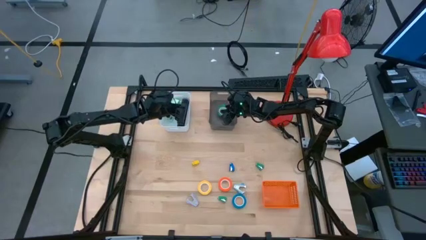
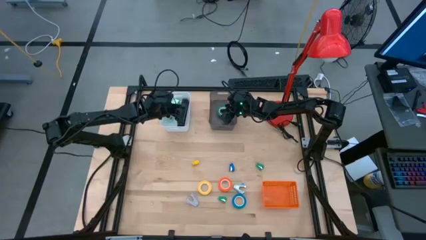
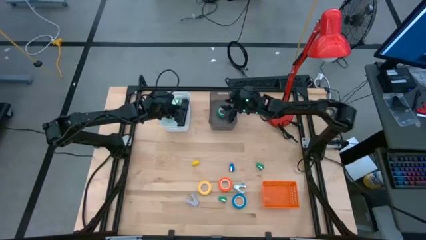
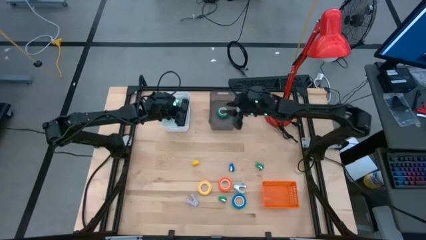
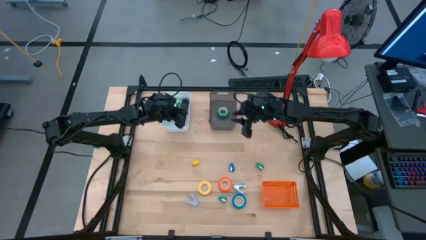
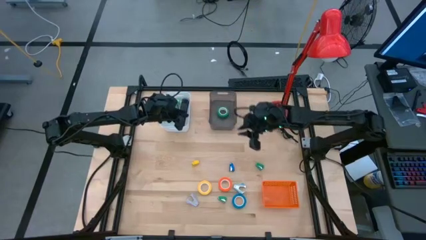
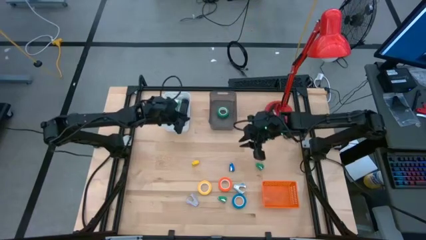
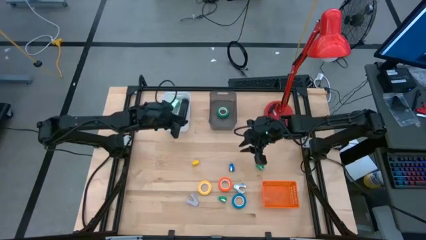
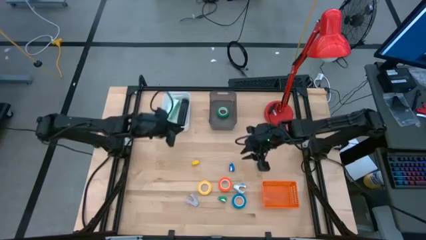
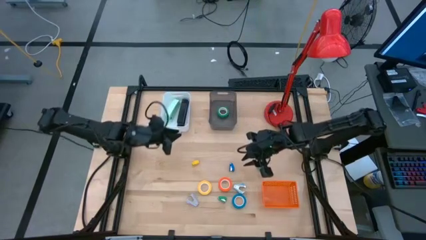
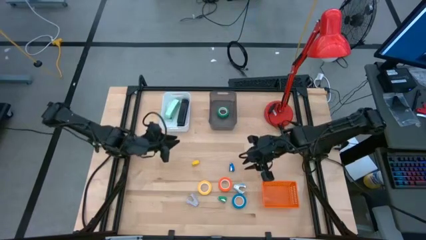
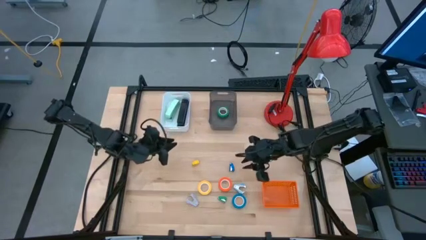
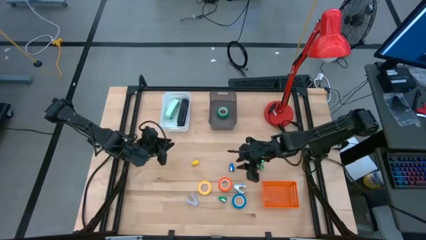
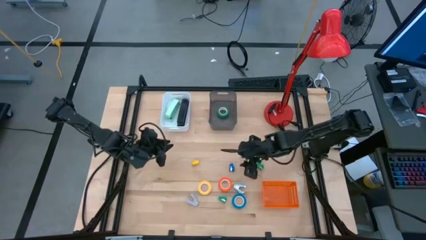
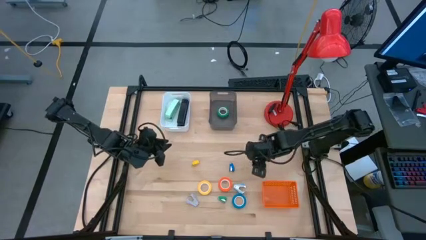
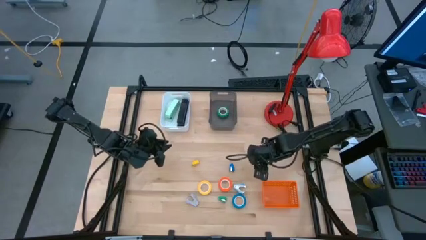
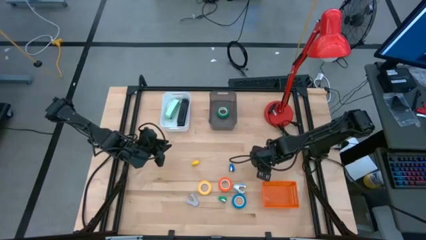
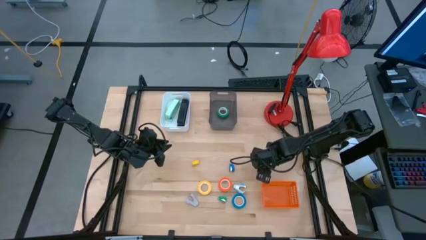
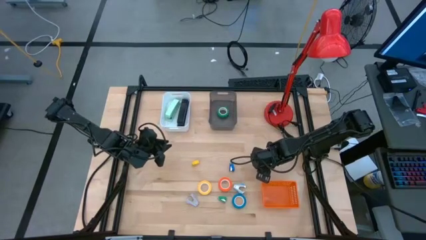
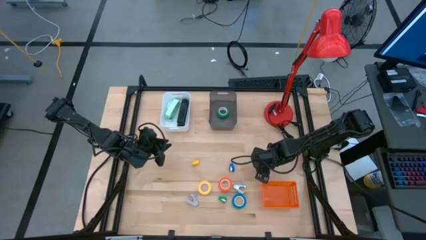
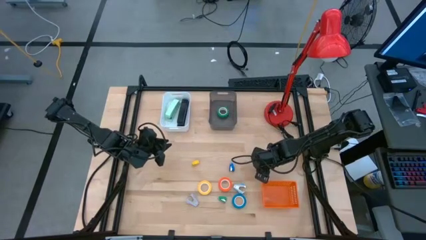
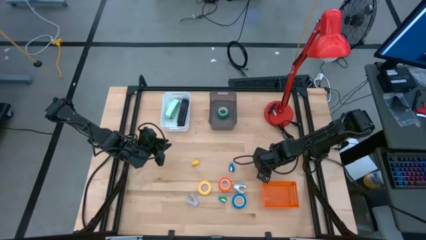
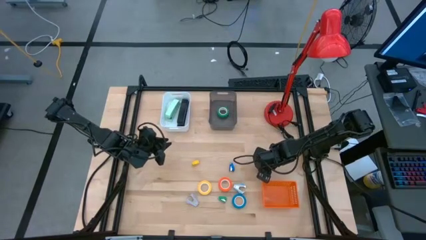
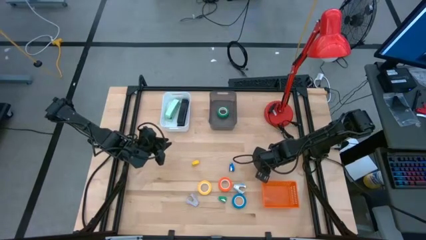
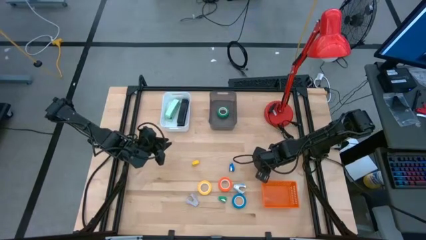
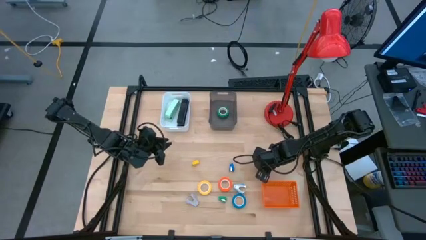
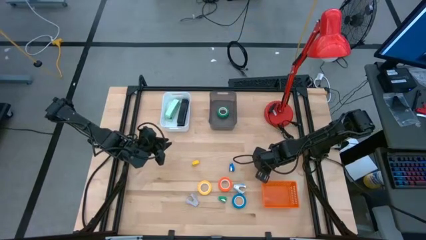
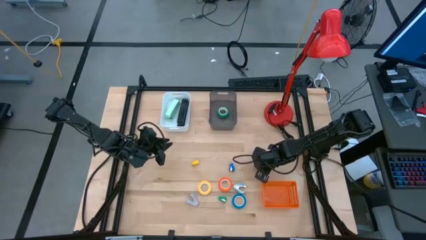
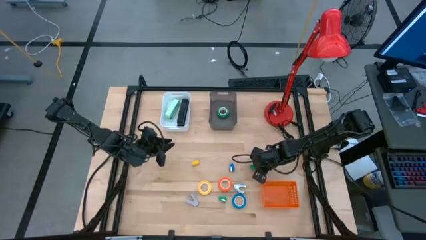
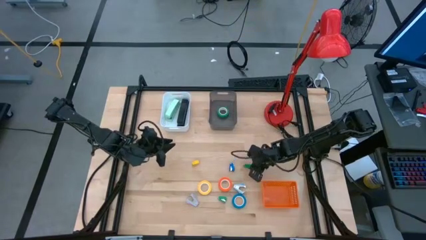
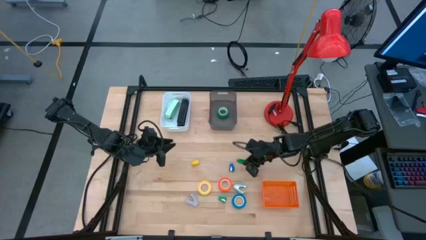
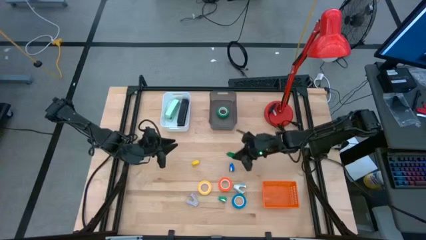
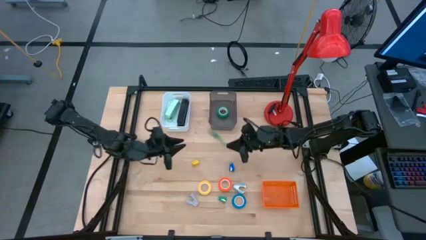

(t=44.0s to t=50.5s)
Task: Pick and place Stapler, Stapler remover, tape
Put the small green stapler into the white bin

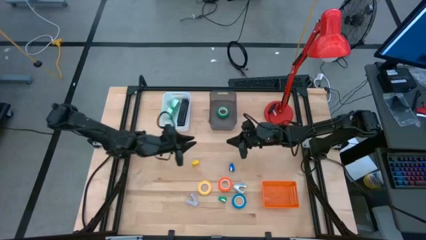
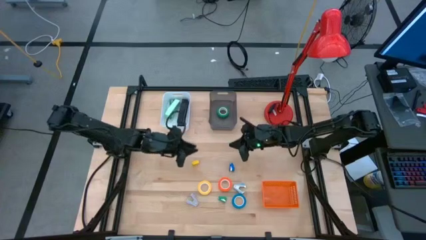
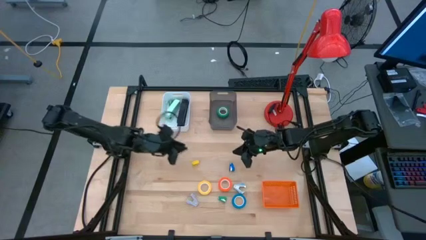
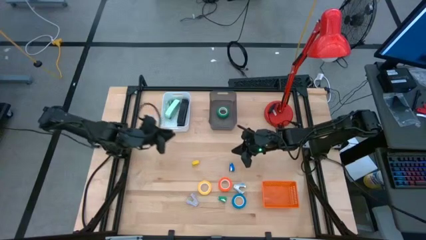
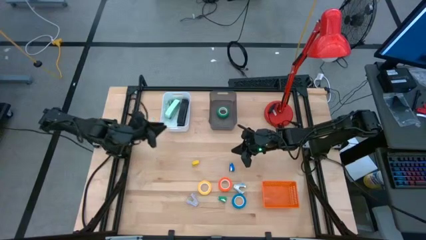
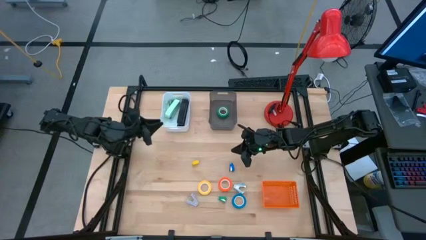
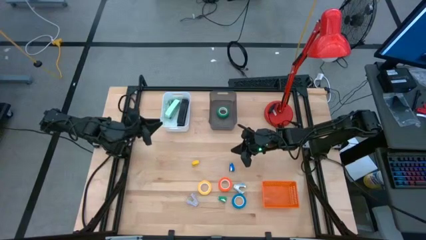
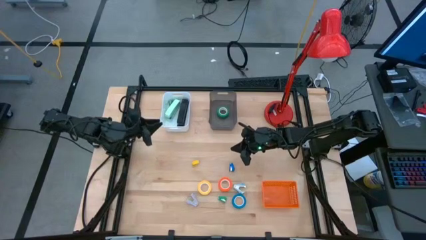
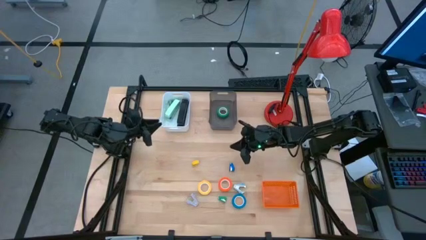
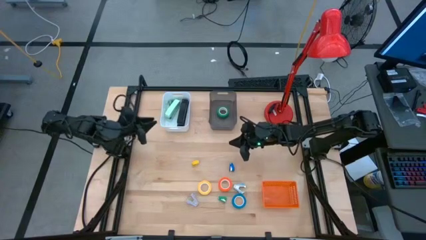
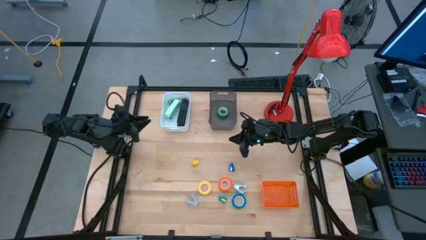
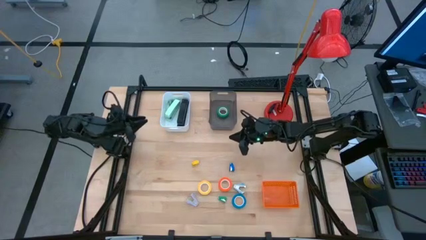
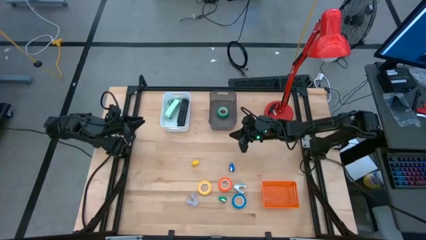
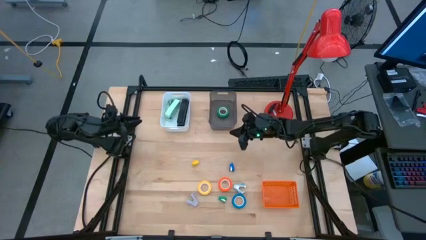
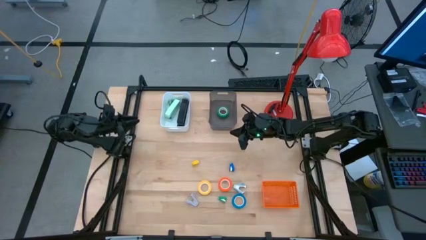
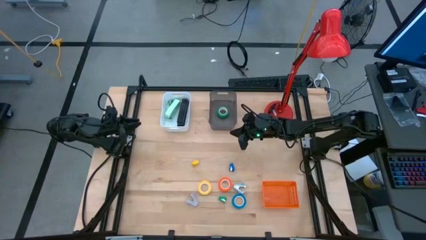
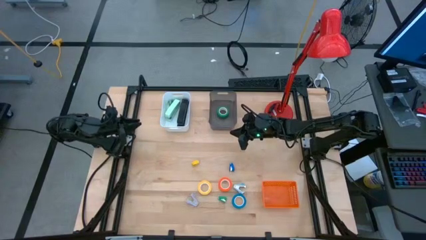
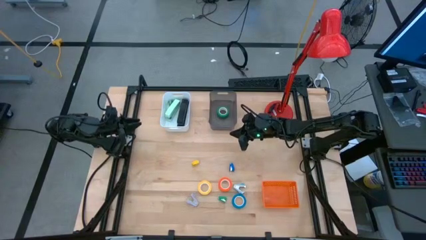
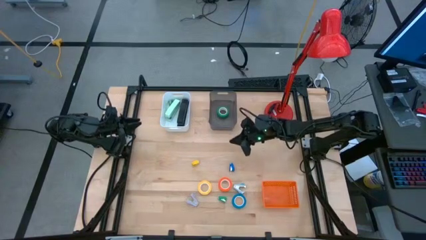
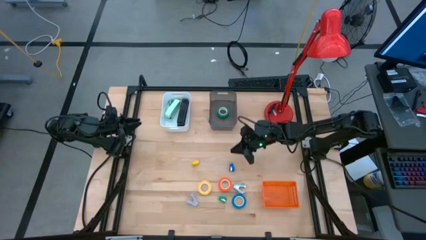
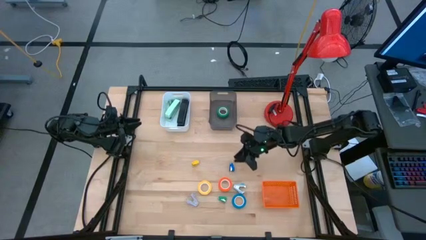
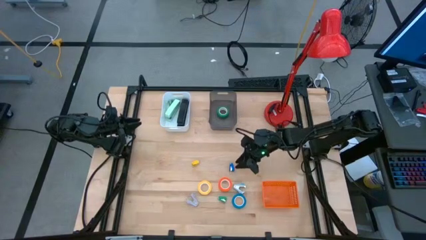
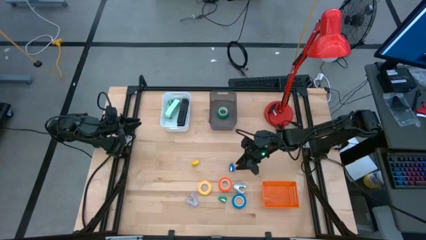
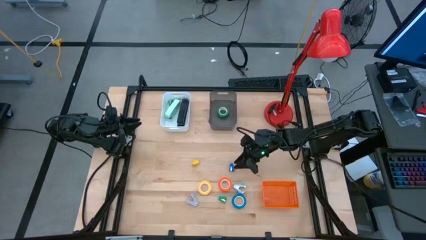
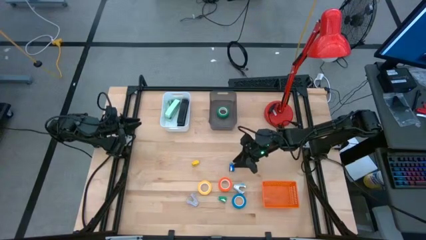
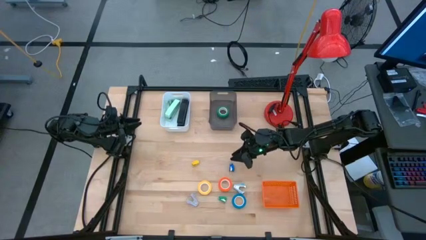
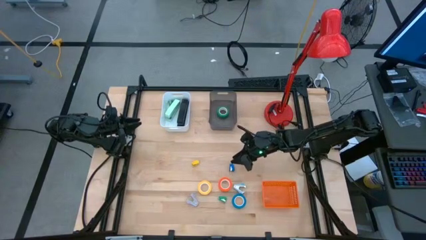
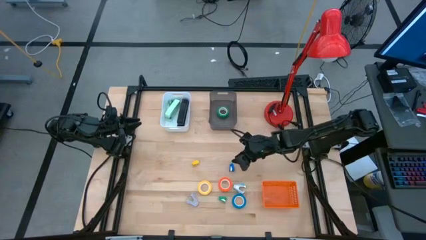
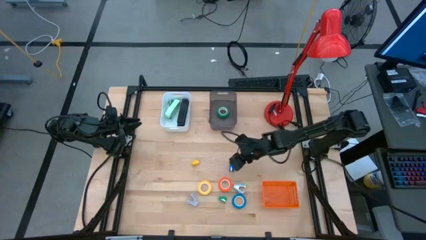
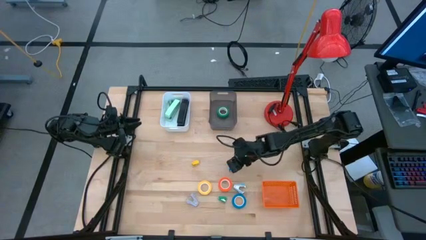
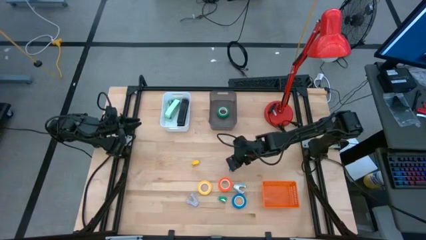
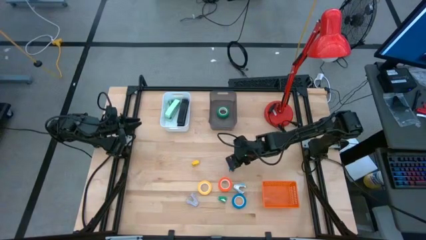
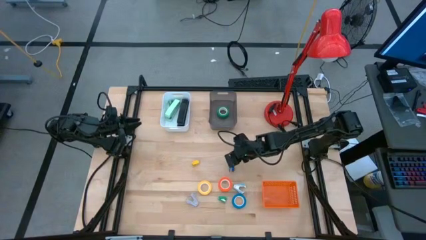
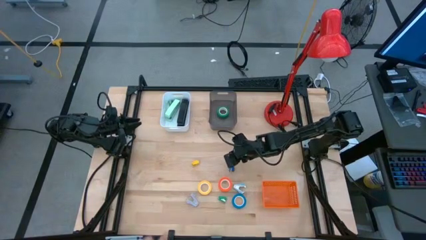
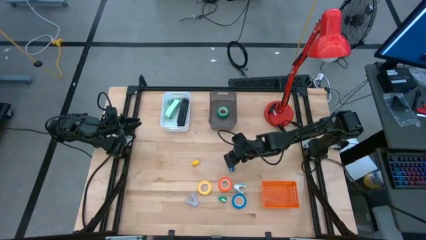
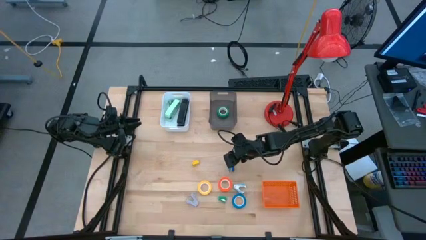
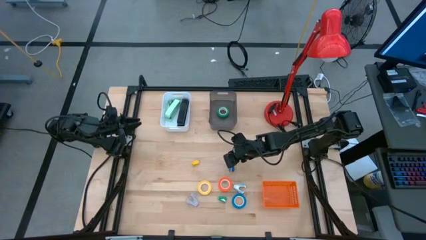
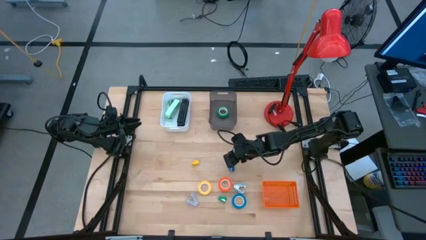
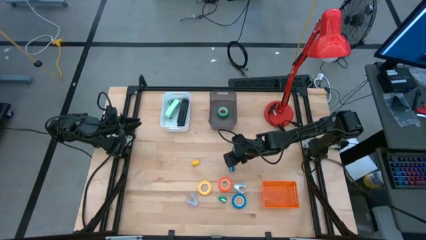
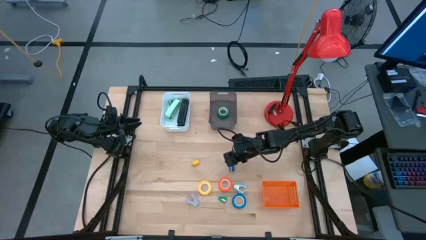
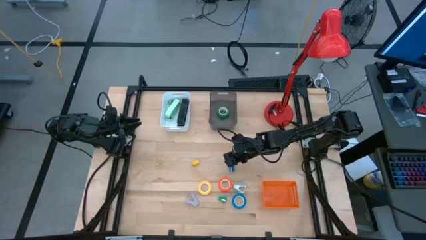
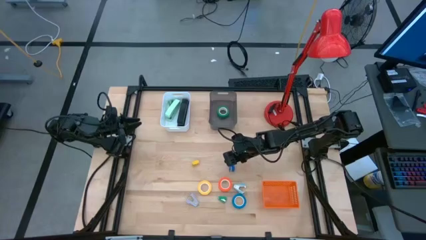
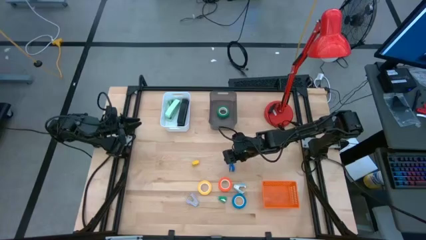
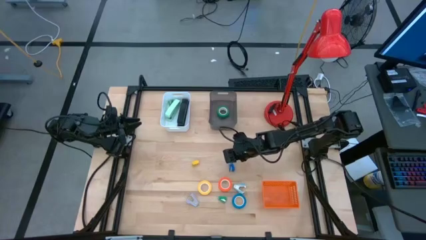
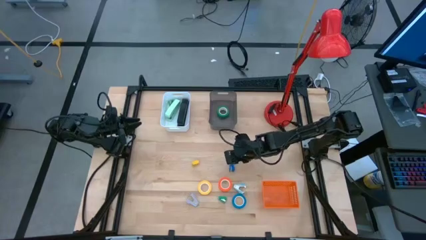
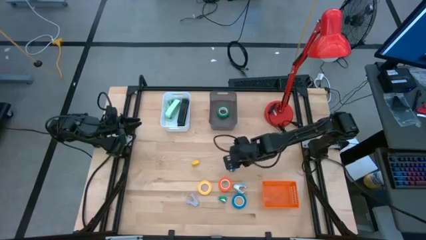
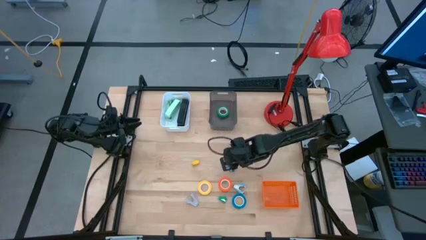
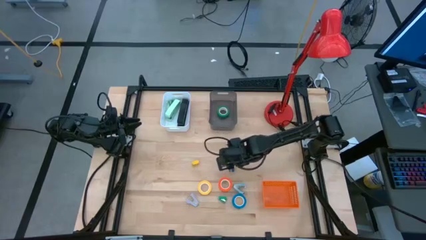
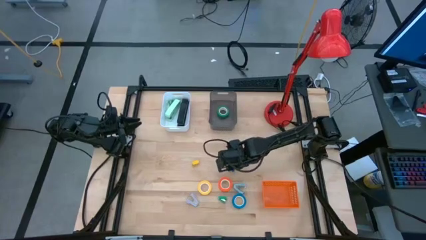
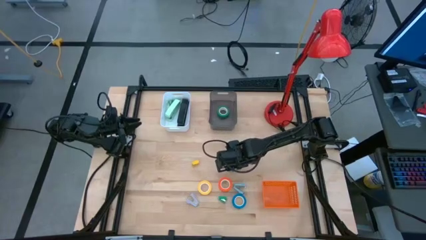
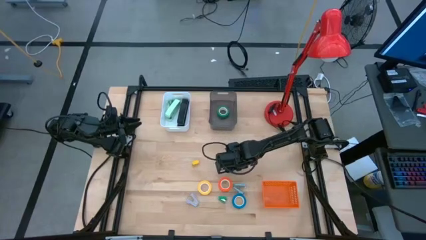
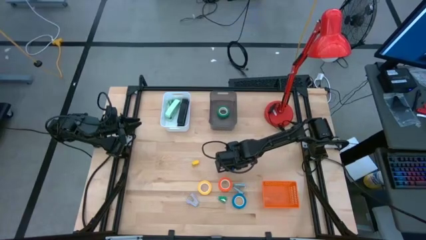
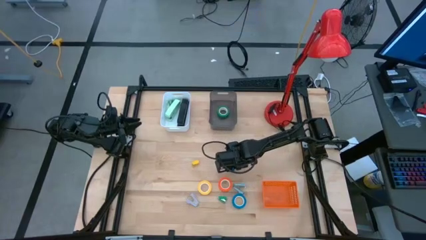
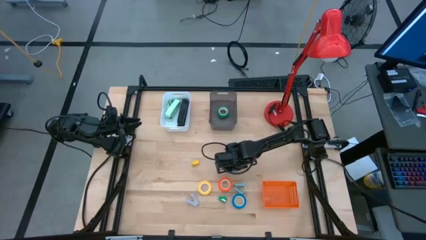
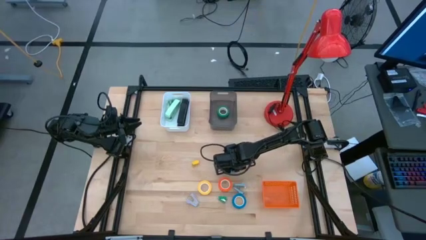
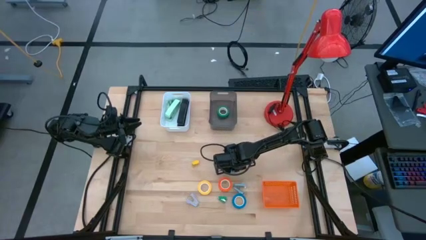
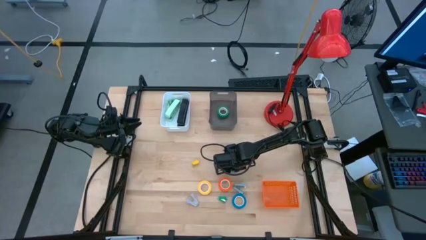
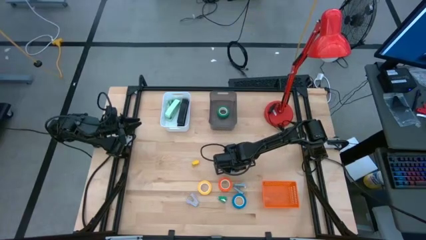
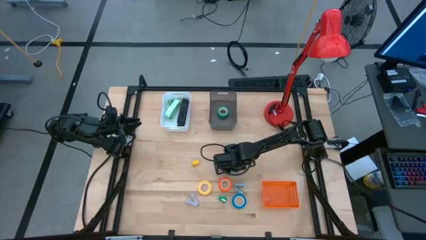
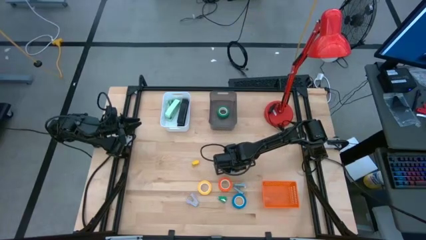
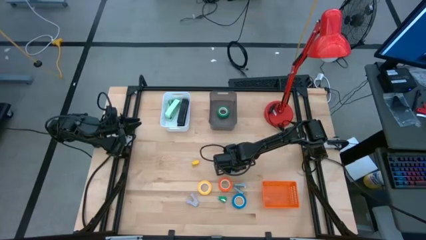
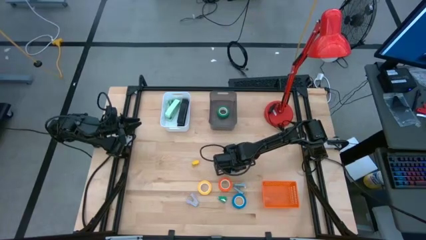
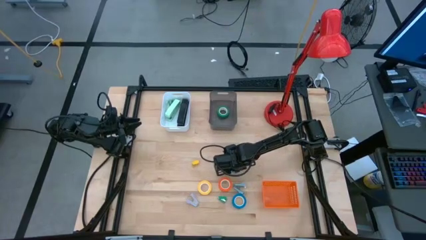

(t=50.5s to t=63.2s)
Put the small blue stapler into the white bin
